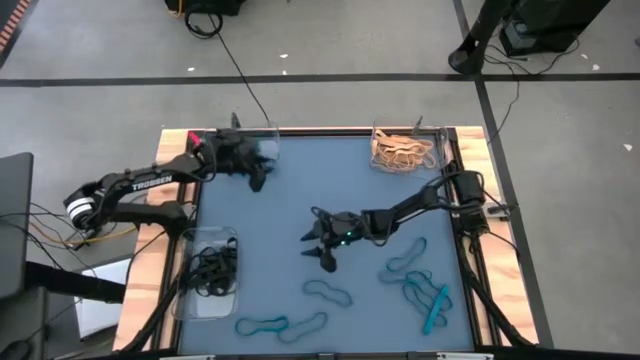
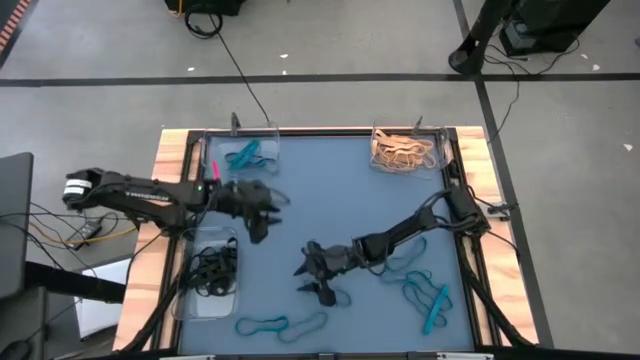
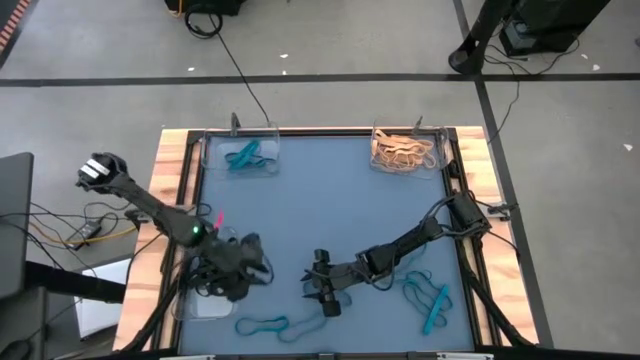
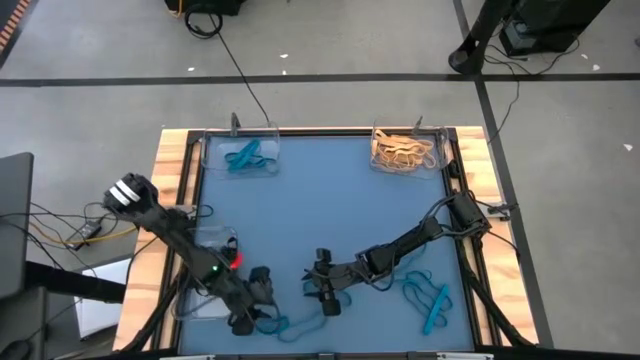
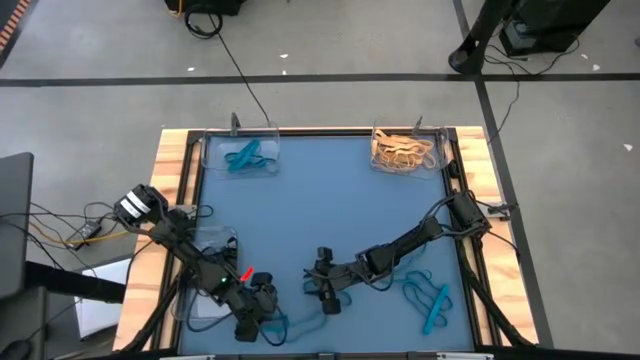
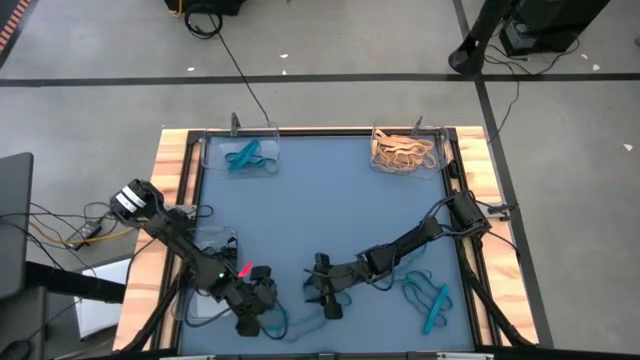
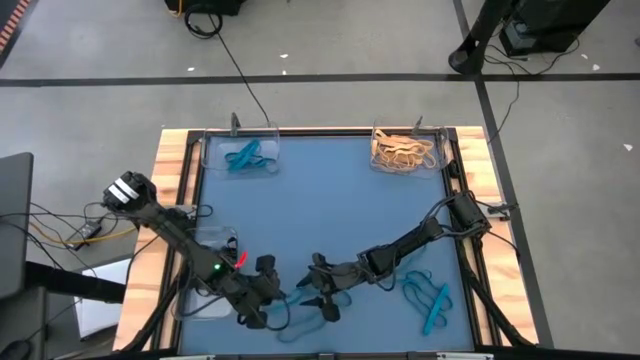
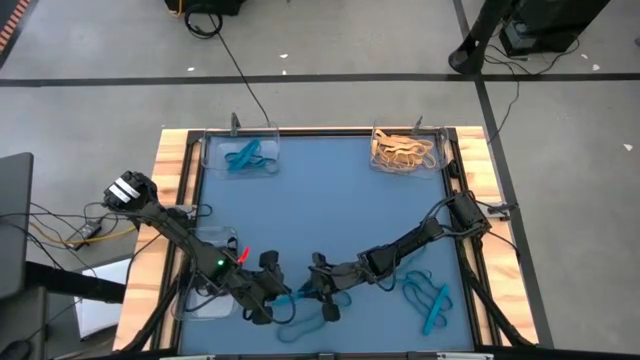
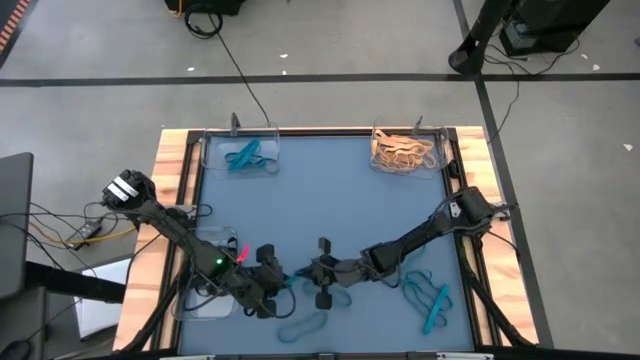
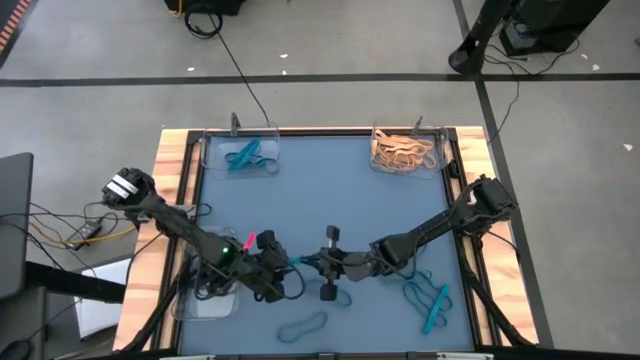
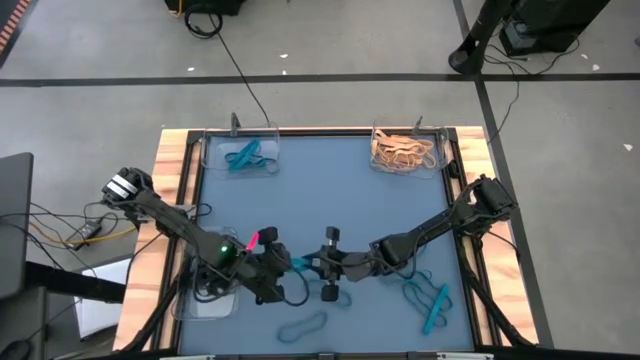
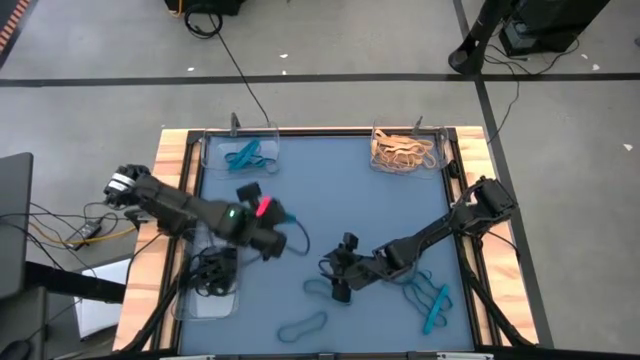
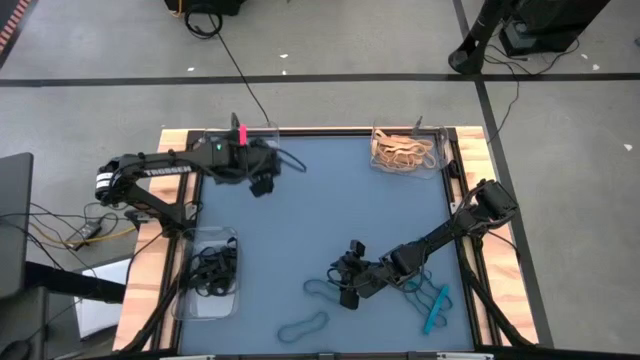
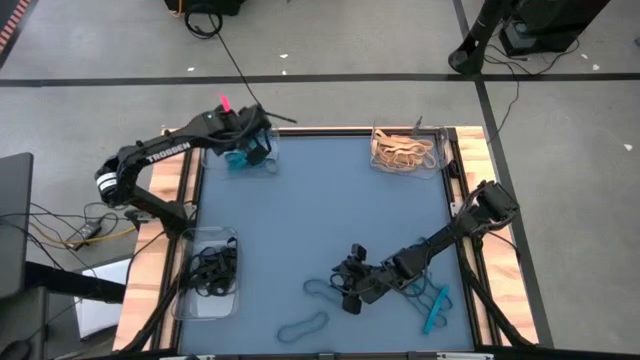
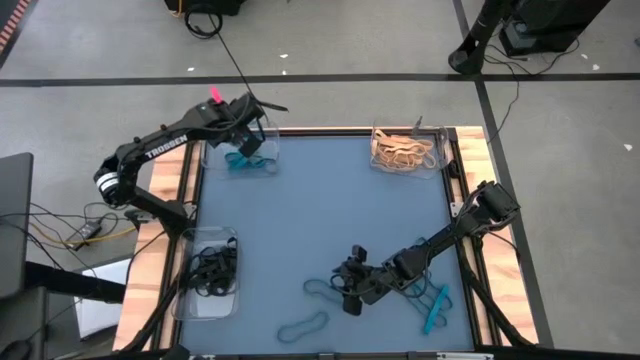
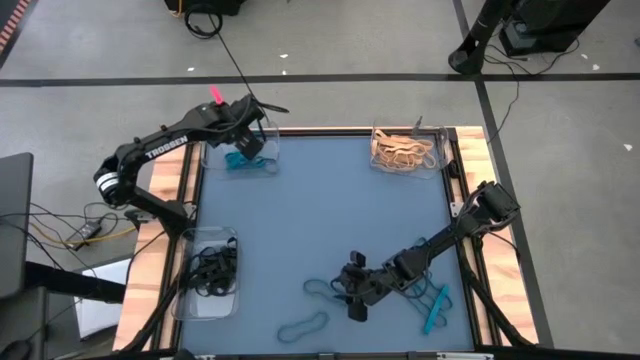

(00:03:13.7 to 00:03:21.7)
Task: Sort rubber bands into baskets
Put the blue rubber band into the top left transparent bin

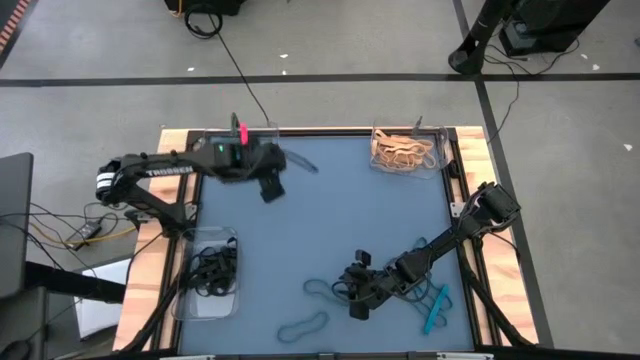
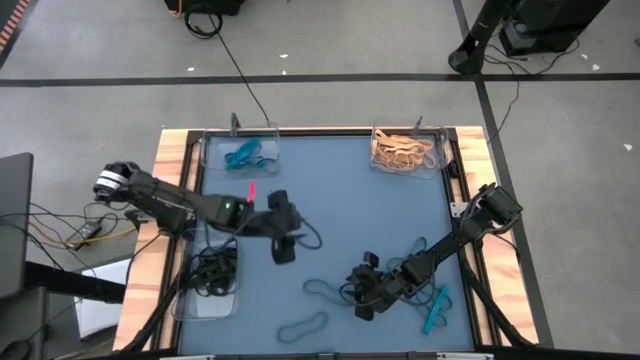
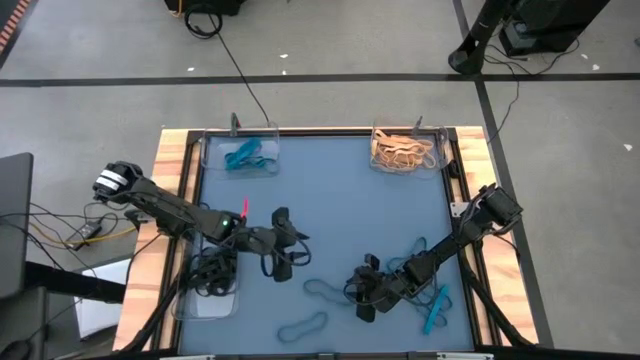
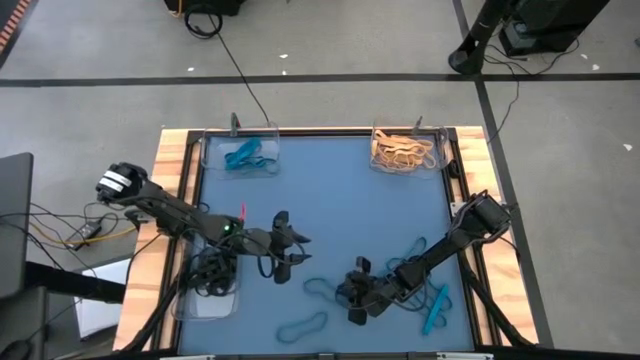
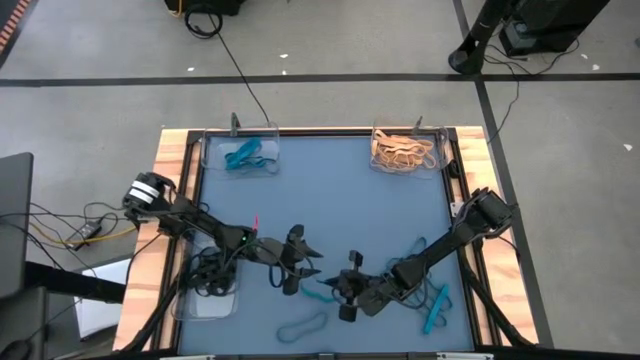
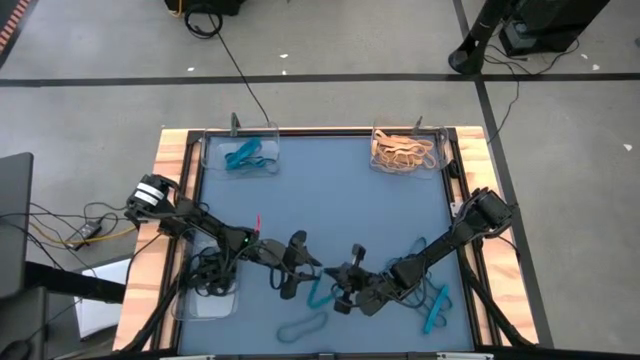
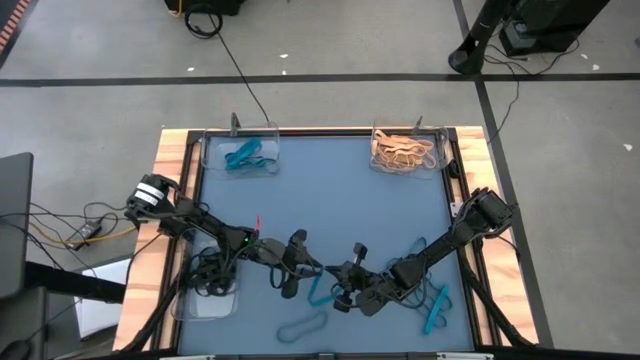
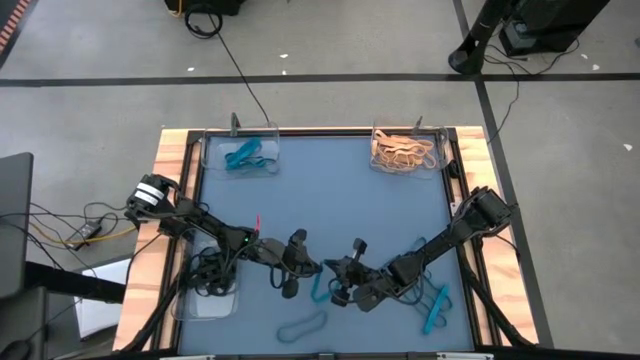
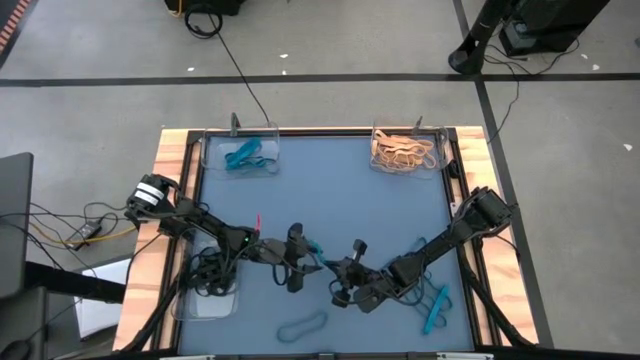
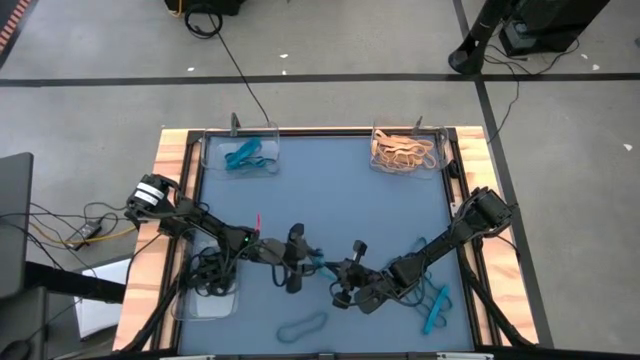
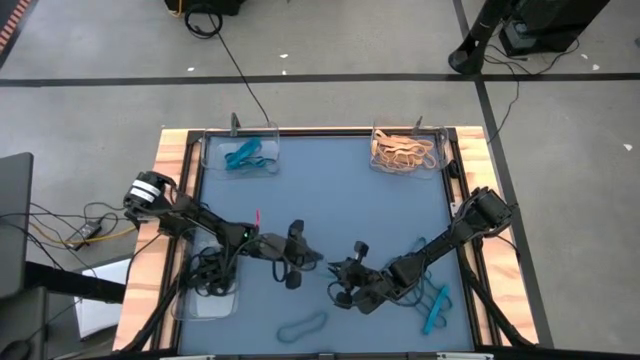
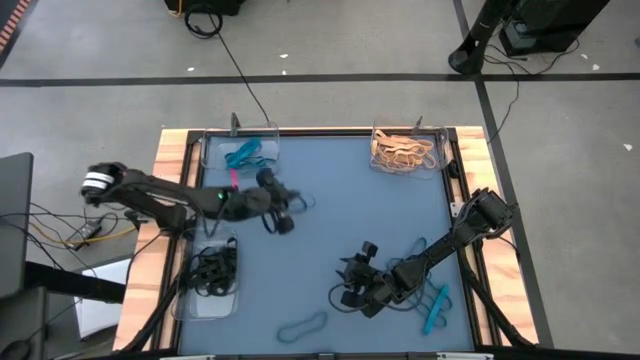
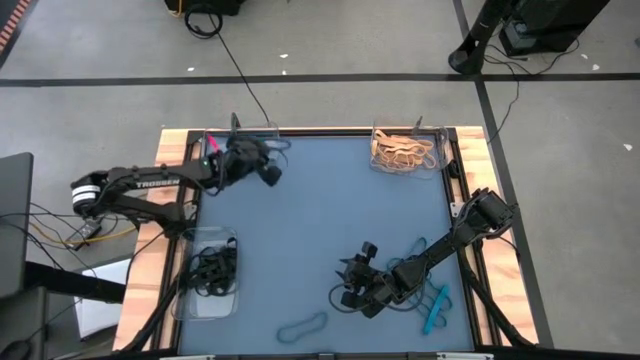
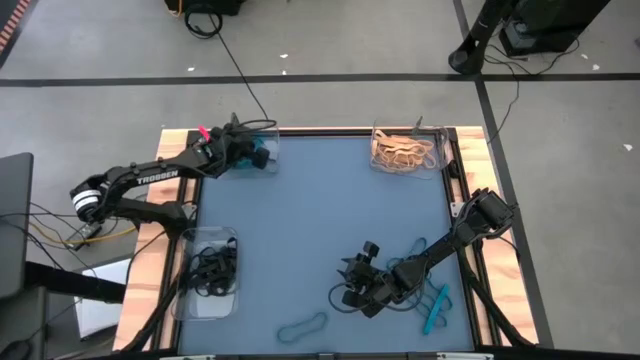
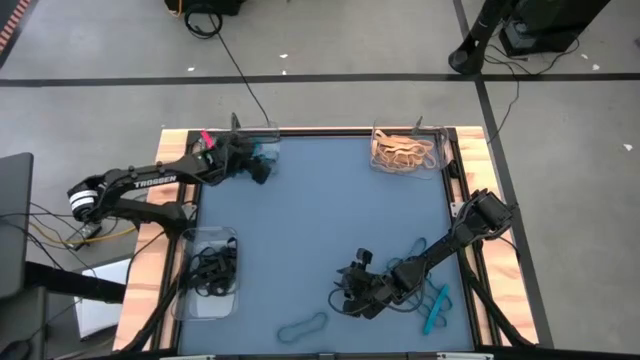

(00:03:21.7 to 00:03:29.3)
Put the blue rubber band into the top left transparent bin

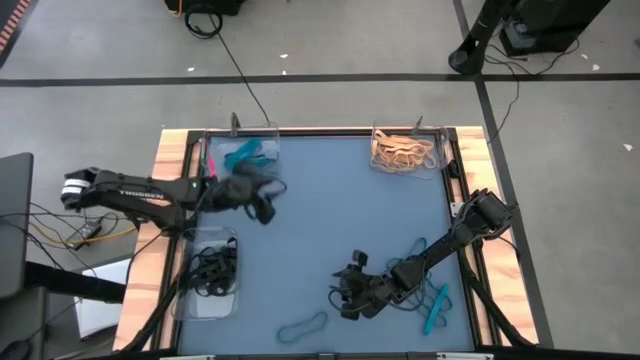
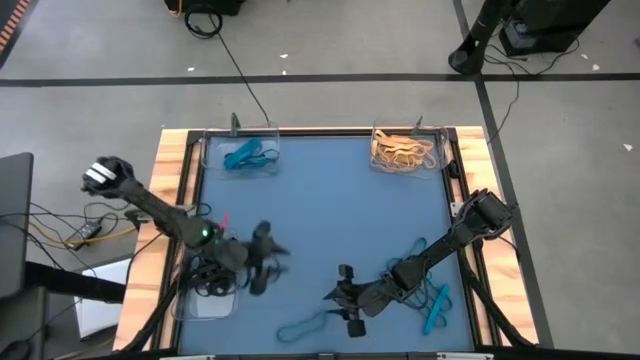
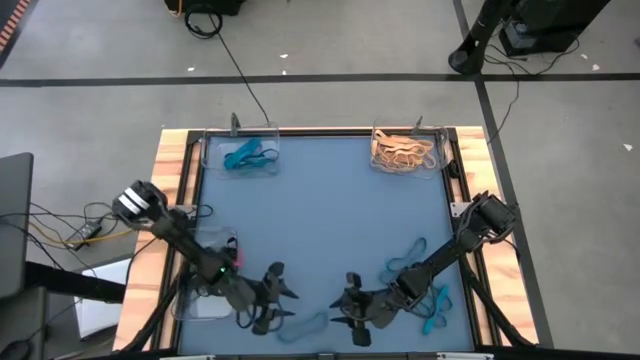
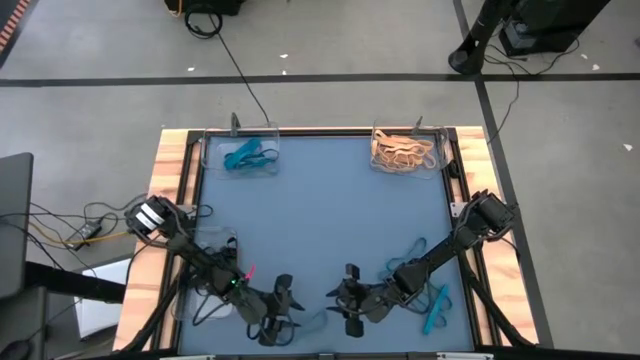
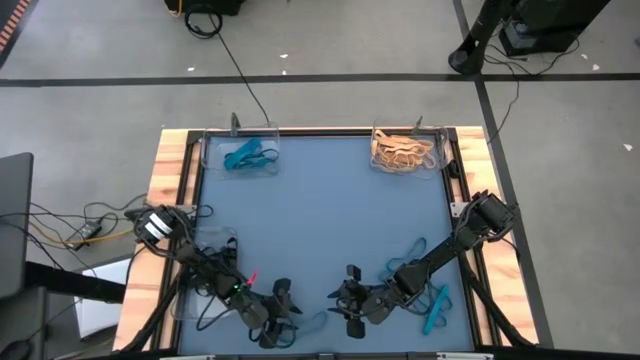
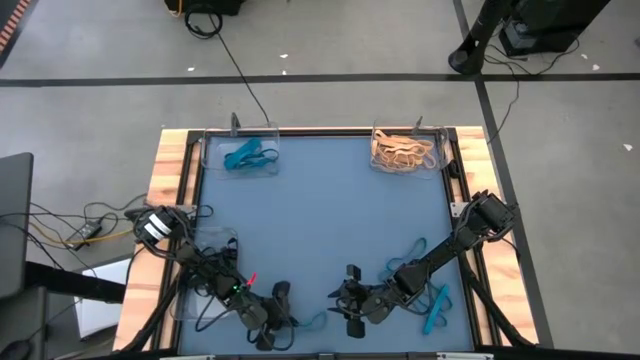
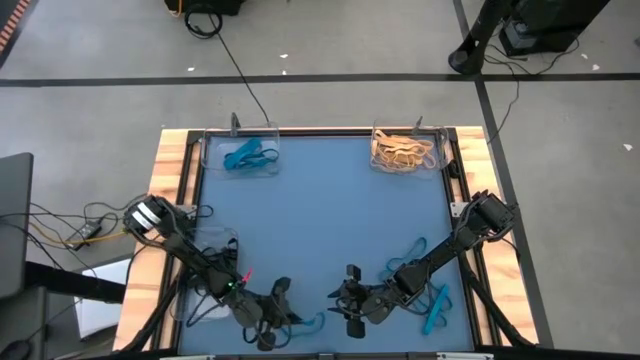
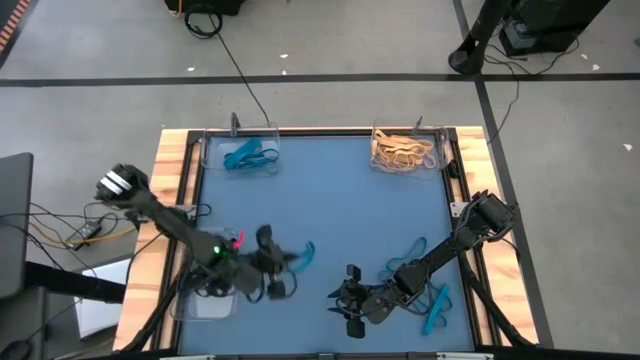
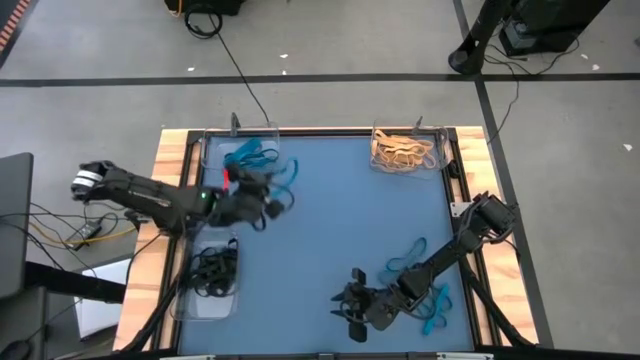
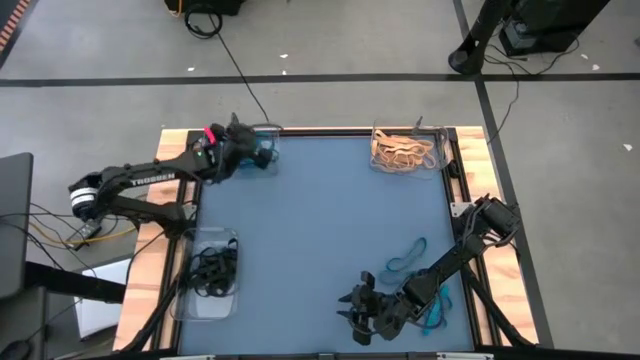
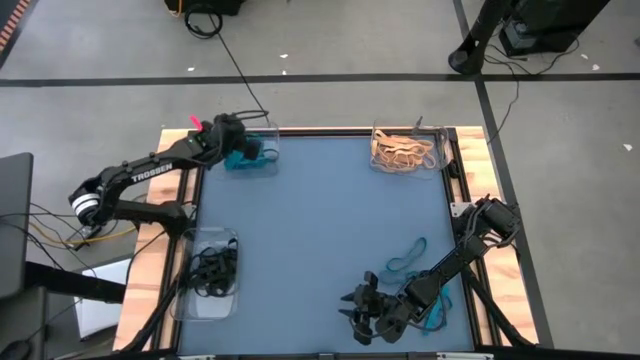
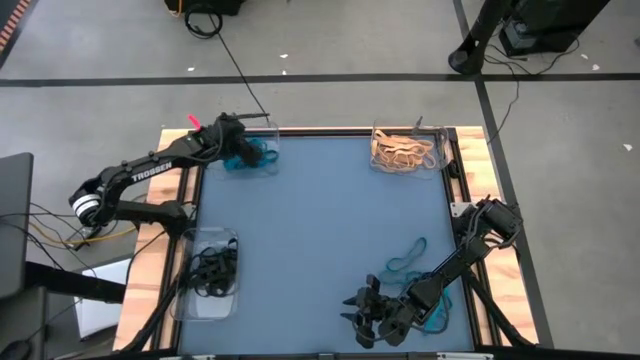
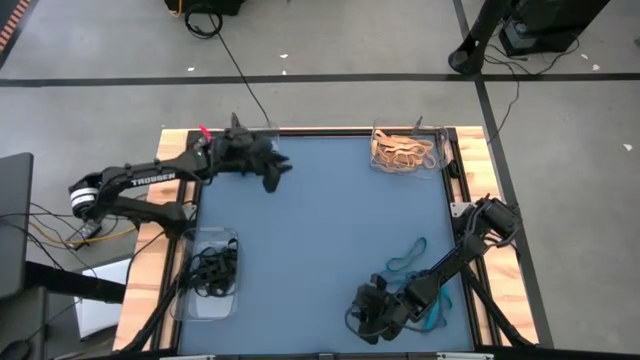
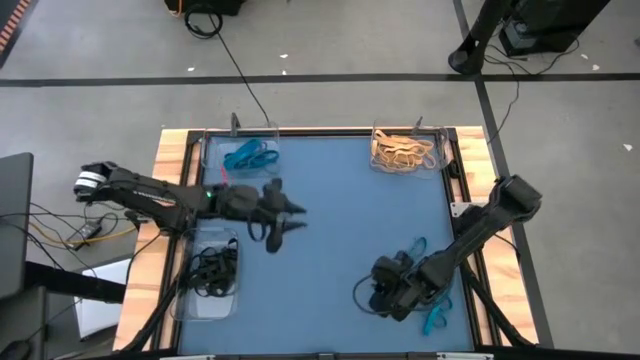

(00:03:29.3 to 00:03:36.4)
Put the blue rubber band into the top left transparent bin
